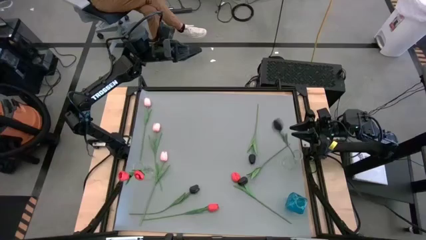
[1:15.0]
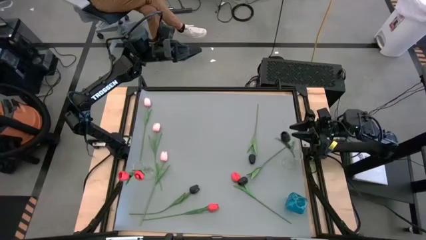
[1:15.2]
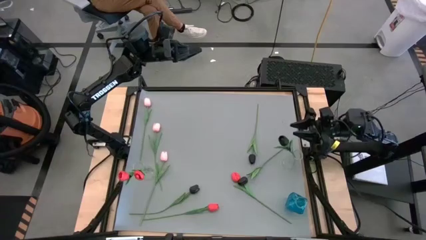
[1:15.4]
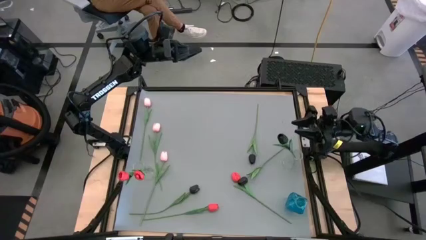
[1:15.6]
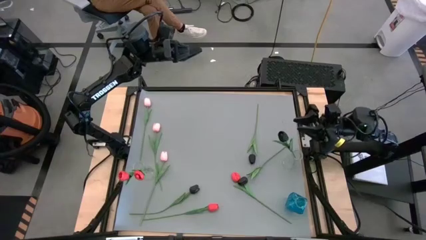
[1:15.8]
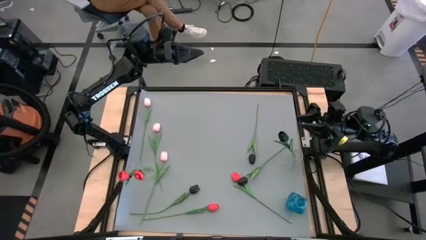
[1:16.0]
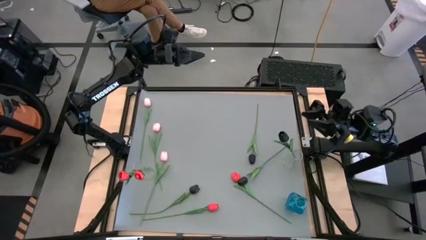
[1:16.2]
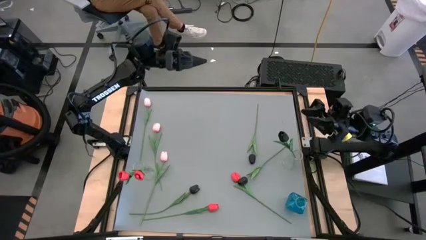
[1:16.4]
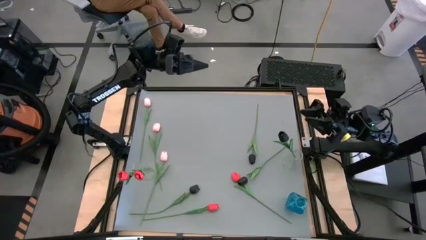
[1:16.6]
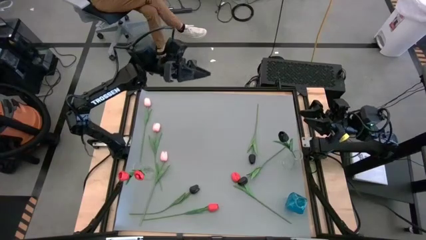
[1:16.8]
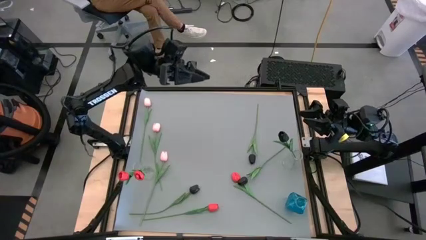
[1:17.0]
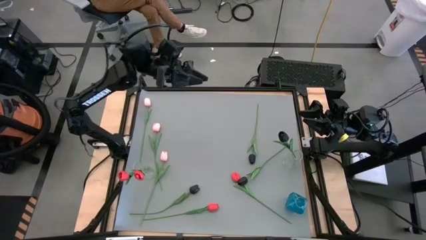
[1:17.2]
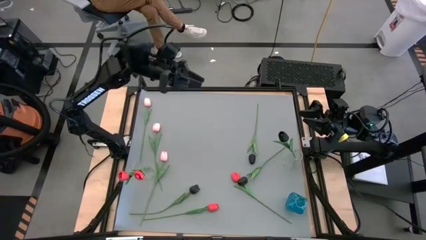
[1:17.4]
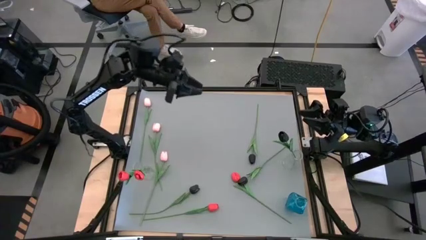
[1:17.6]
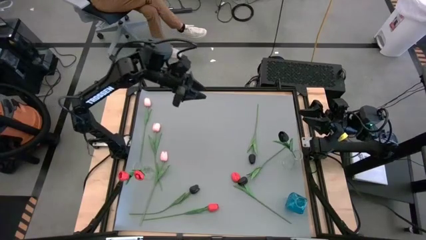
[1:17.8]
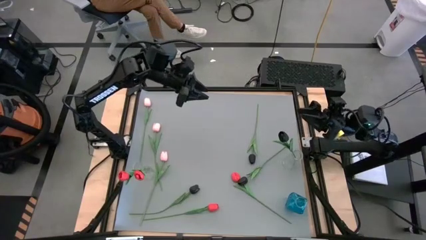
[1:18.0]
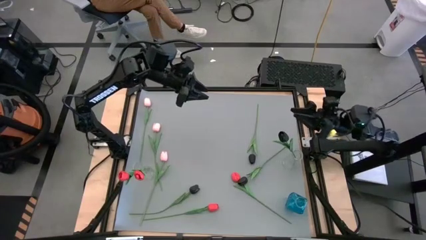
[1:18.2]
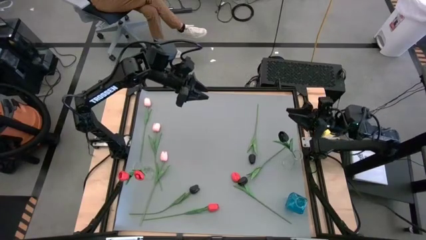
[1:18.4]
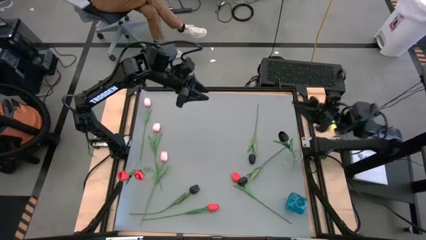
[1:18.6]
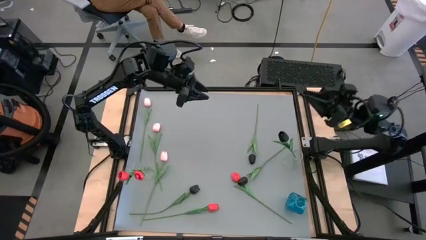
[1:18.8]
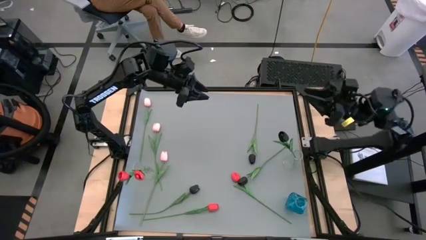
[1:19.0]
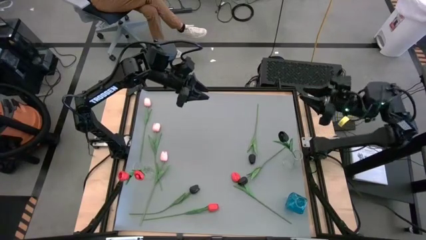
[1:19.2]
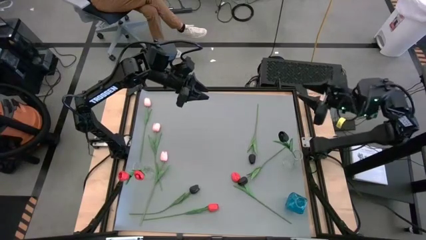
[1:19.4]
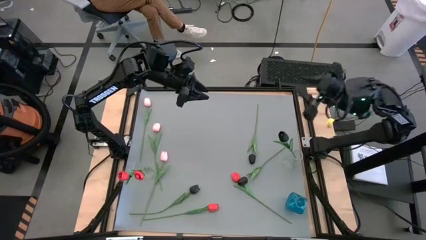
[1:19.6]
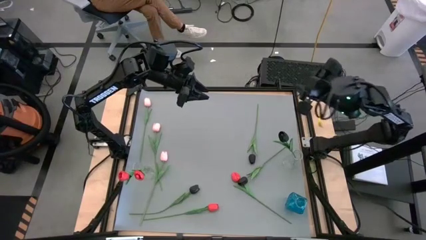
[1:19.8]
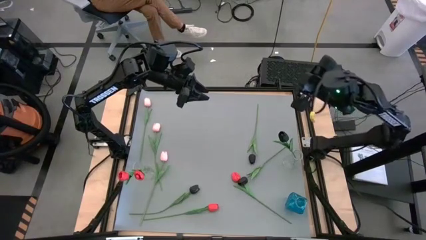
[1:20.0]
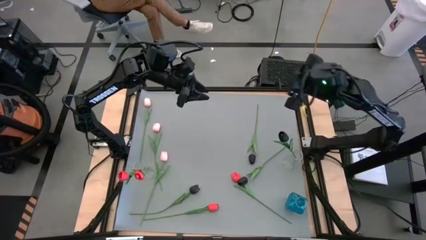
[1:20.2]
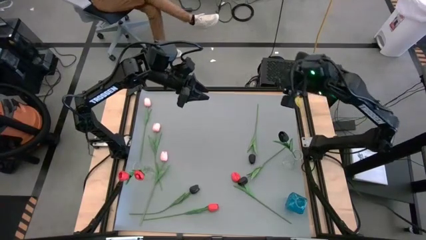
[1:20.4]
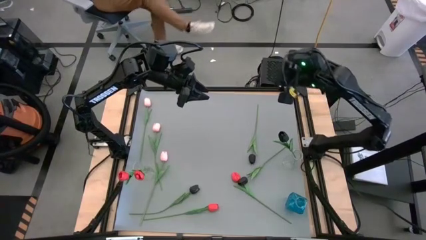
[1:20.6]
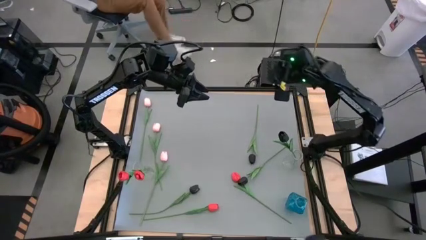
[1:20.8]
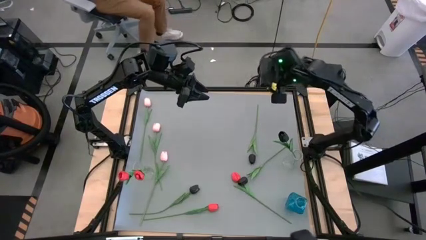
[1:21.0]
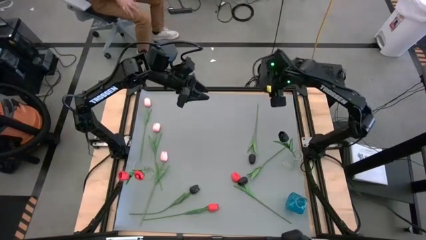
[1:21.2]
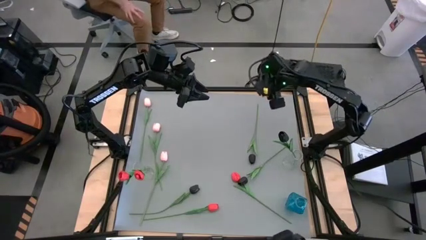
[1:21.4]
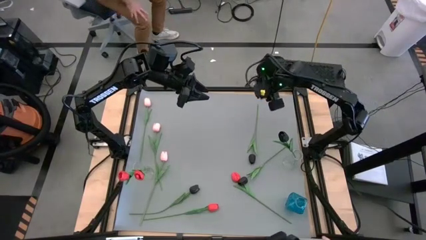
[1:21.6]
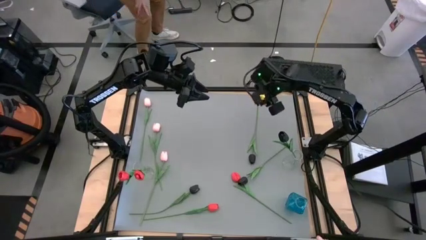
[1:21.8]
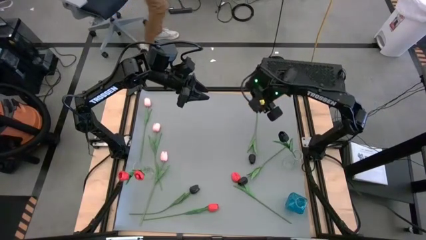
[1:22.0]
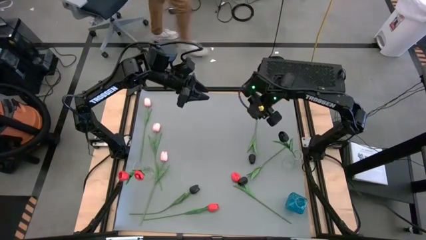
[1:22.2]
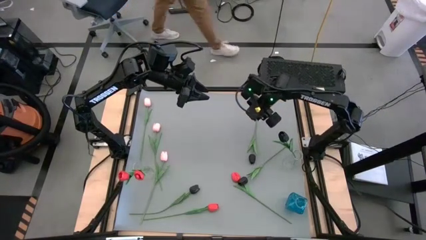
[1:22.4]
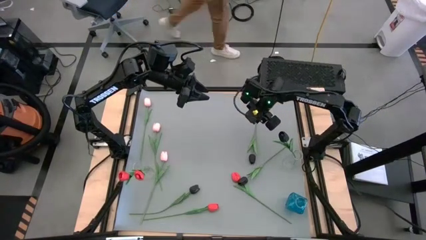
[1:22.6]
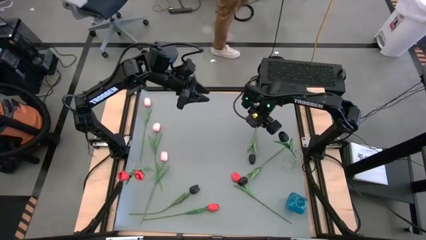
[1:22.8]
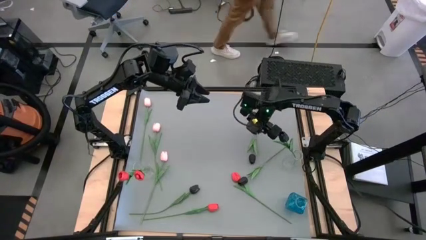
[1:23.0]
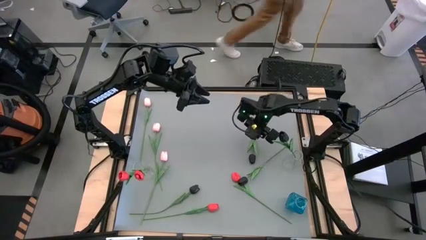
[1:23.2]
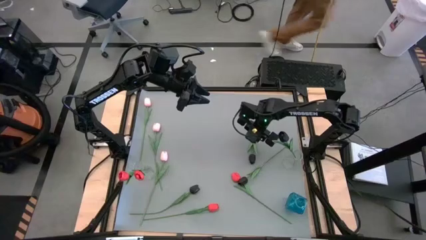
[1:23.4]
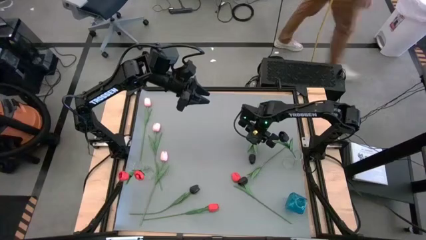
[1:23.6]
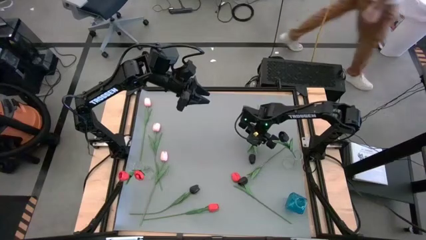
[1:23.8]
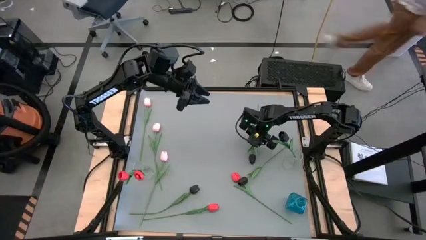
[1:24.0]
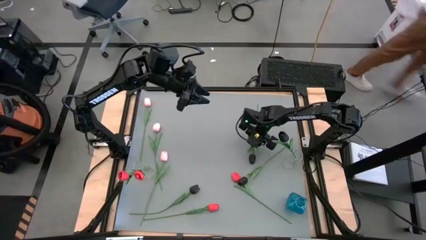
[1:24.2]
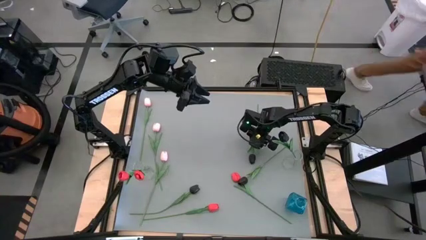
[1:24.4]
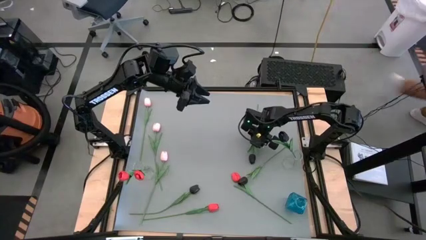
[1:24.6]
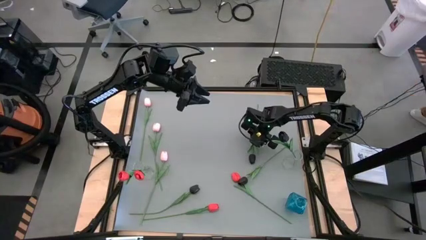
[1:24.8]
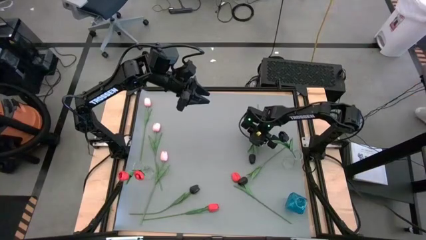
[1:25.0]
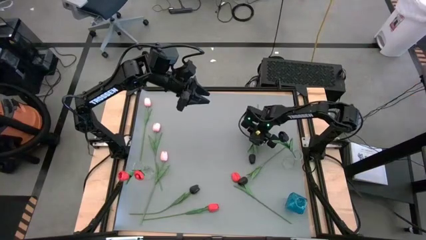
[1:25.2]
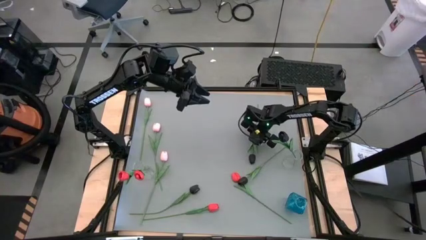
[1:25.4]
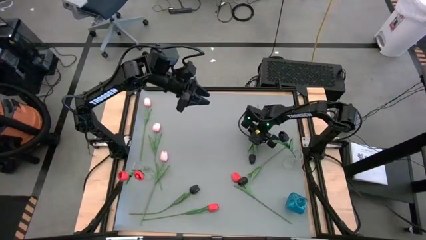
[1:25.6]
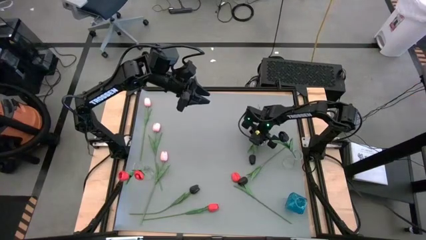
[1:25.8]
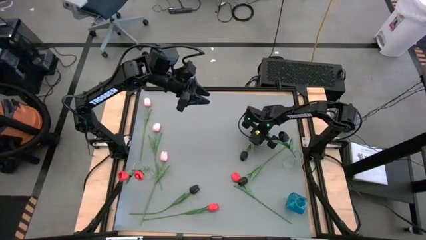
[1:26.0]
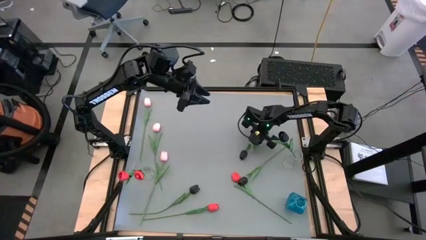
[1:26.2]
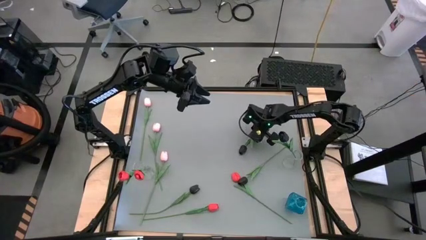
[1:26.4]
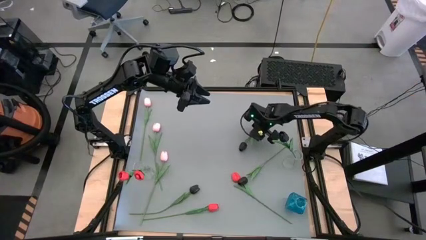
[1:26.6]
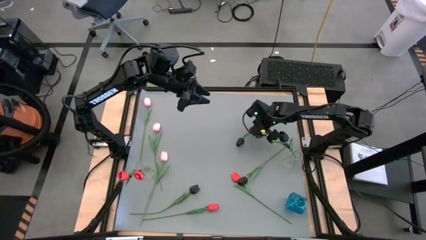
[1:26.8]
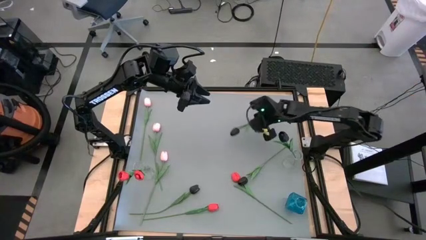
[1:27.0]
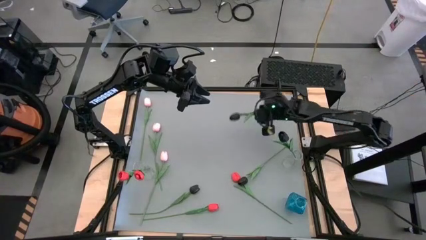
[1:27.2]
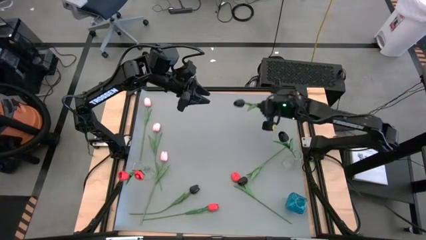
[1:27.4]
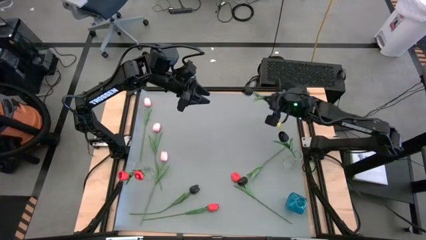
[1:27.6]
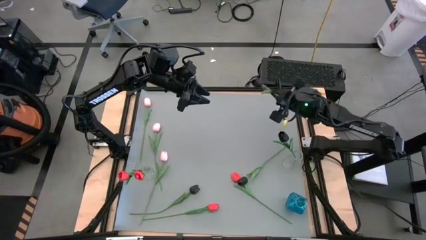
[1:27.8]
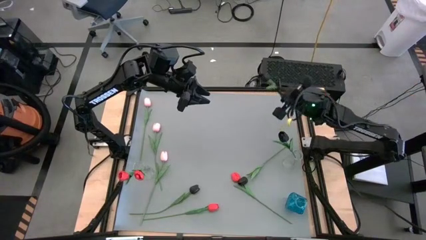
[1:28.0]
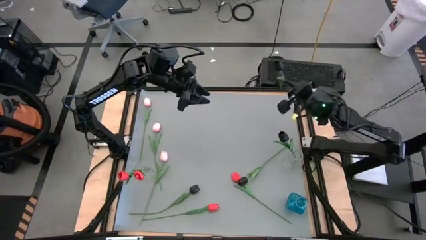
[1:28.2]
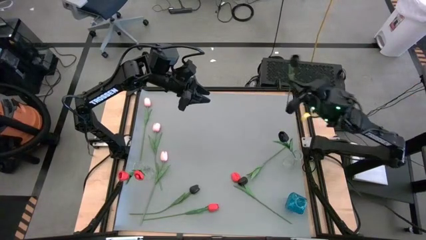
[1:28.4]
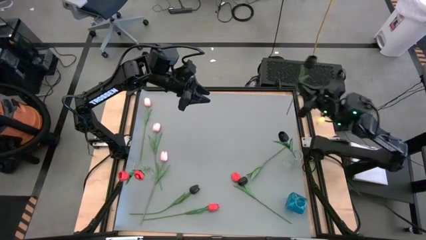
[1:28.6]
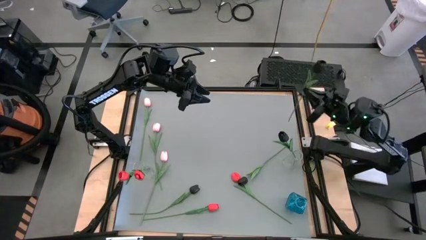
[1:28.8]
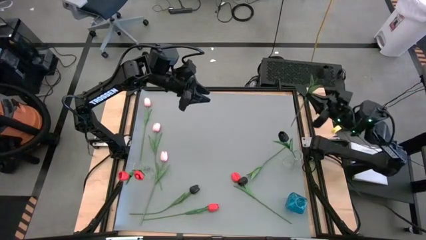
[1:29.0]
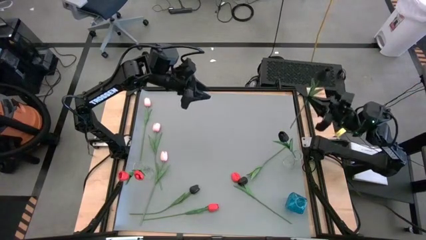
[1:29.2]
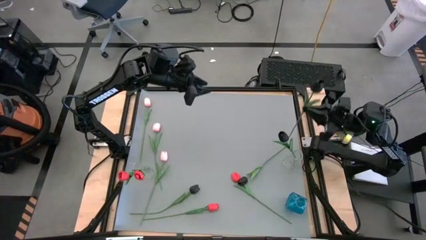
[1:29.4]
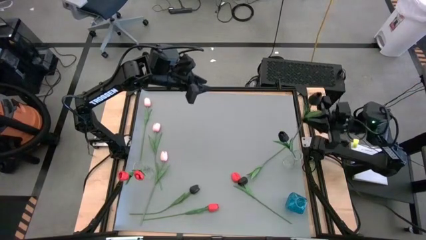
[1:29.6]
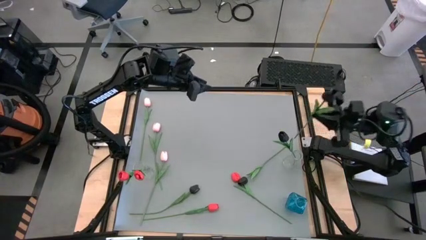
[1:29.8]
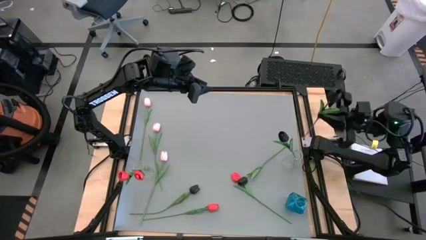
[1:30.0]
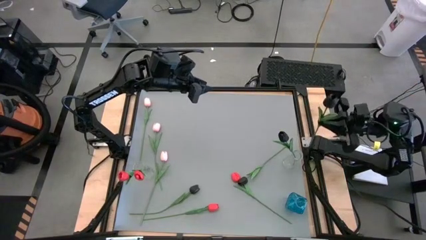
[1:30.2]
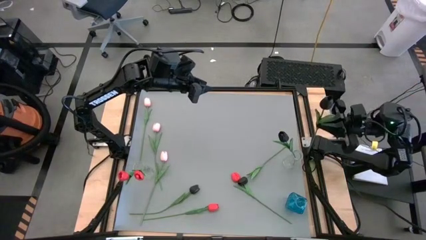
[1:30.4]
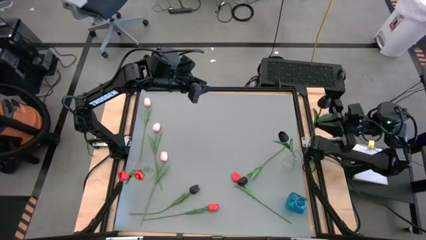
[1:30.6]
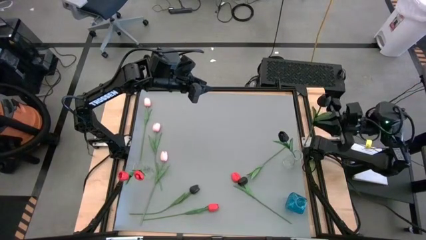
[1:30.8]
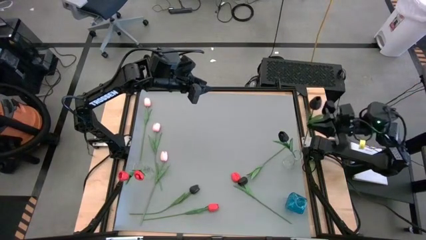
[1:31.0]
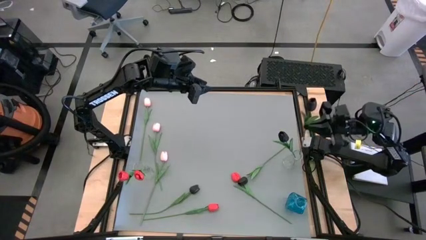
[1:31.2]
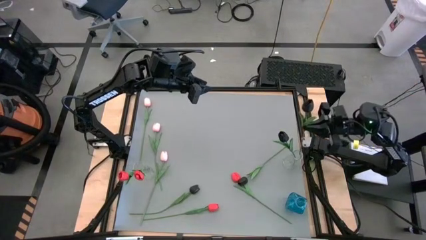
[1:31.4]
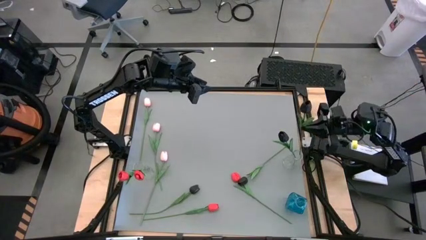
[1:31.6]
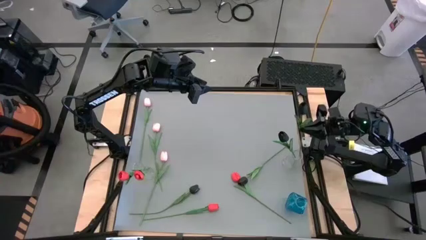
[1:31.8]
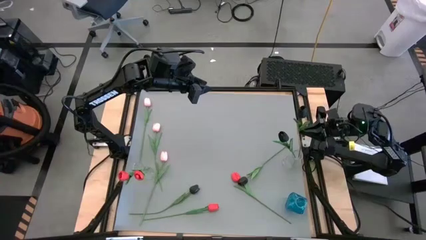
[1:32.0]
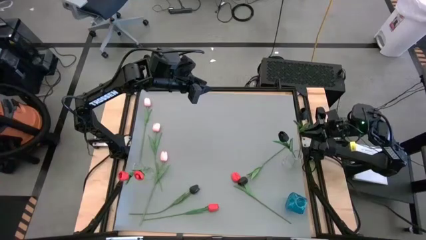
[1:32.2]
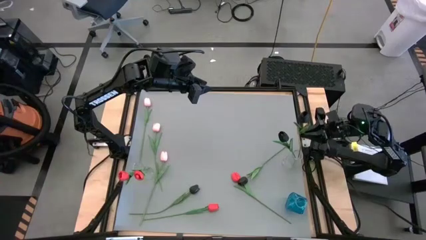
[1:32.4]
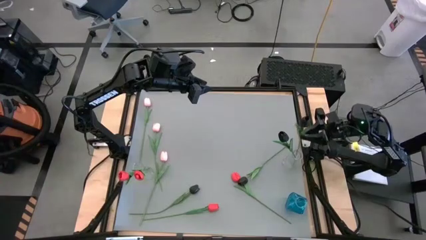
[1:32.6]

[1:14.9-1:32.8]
Task: Sort flowers into vase by color
Put the top black tulip into the right transparent vase
